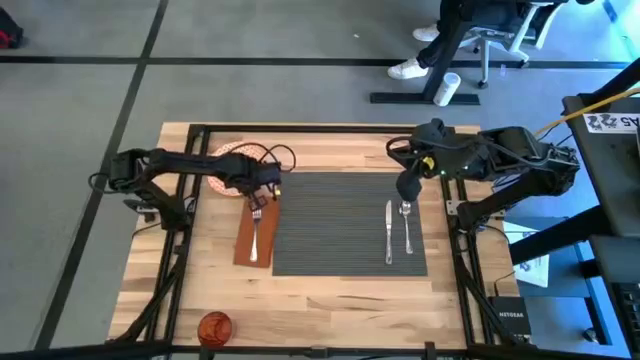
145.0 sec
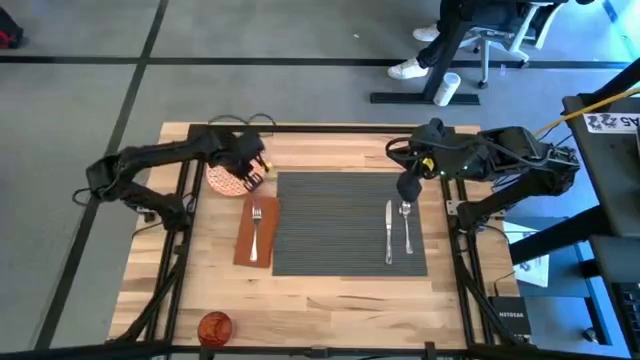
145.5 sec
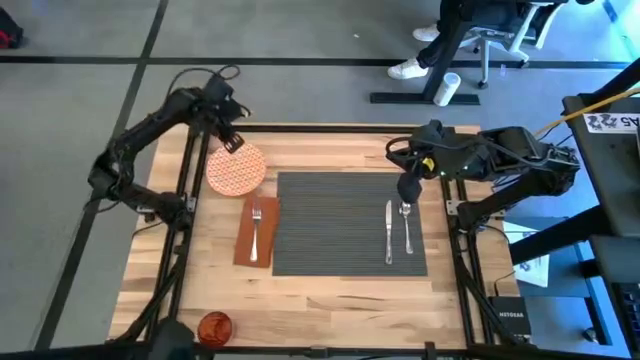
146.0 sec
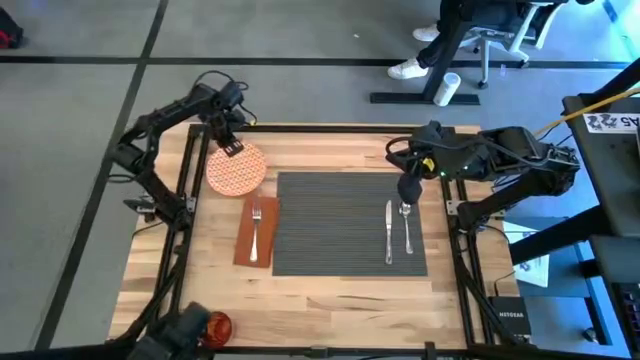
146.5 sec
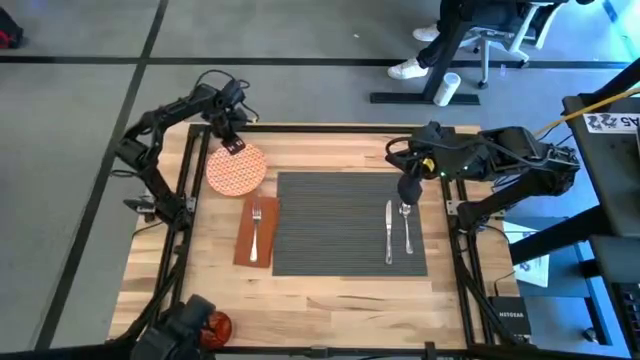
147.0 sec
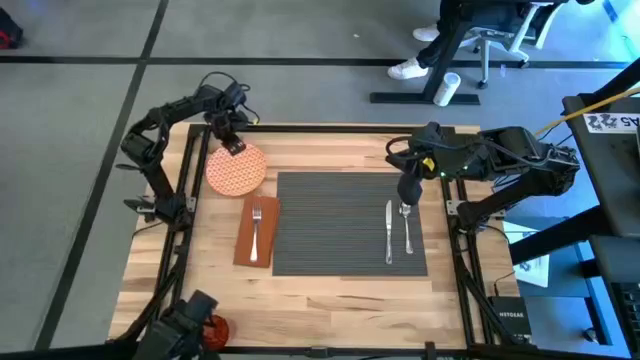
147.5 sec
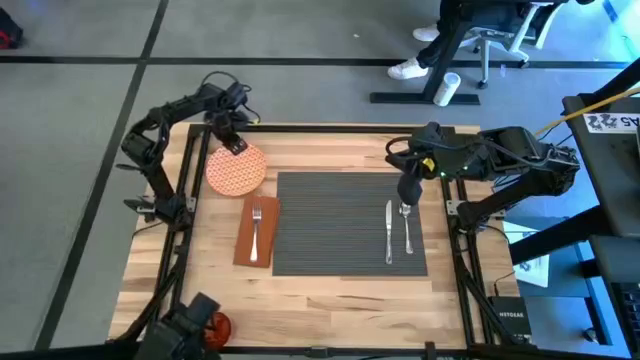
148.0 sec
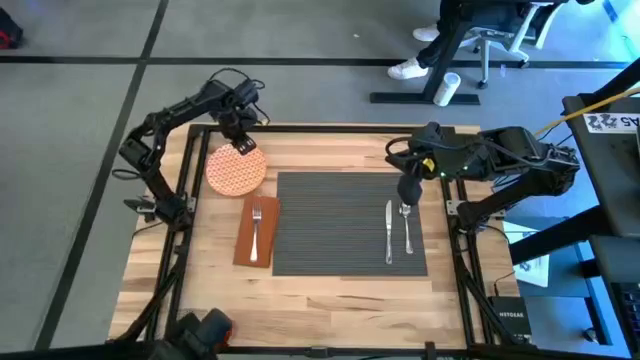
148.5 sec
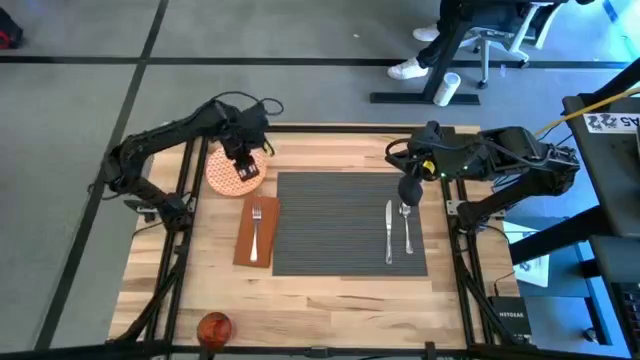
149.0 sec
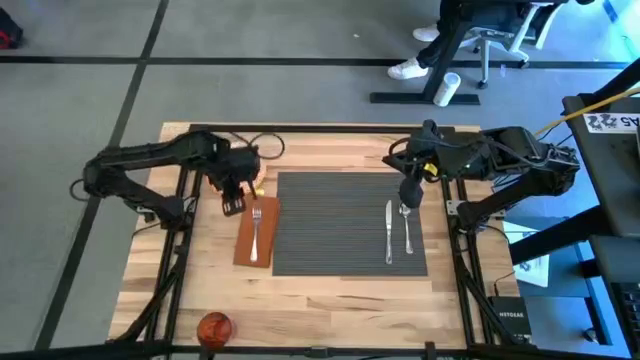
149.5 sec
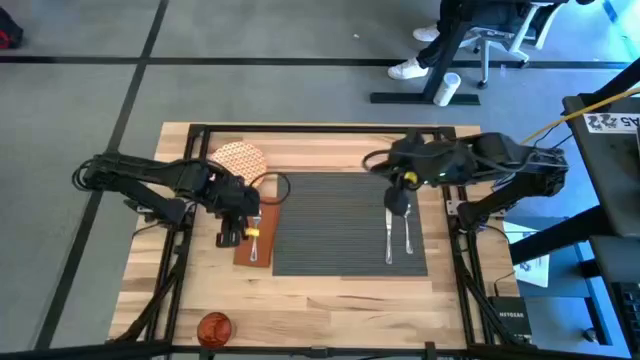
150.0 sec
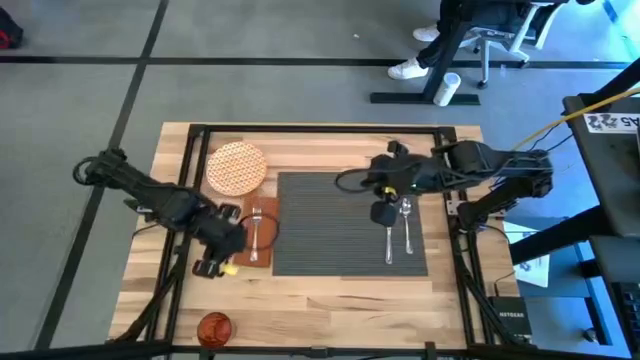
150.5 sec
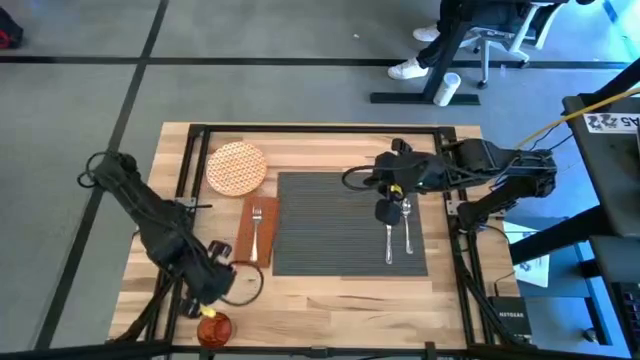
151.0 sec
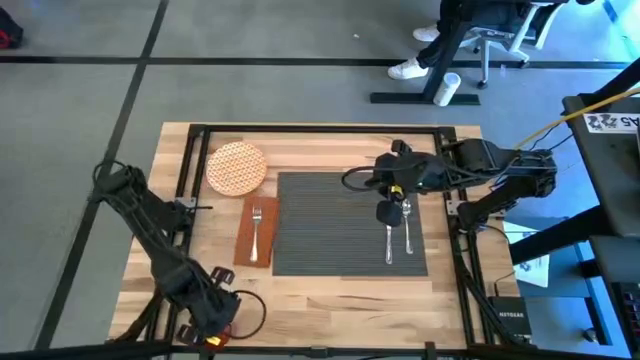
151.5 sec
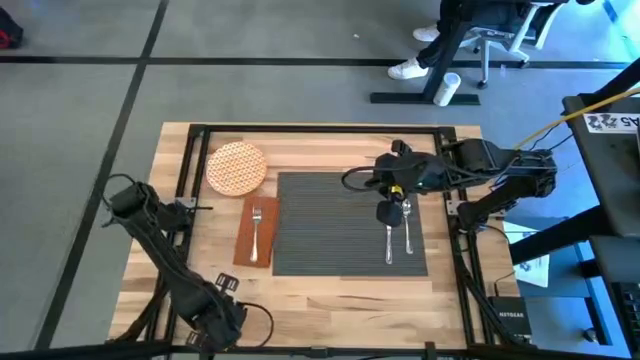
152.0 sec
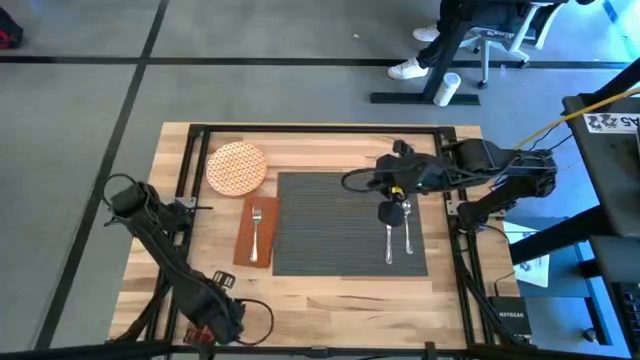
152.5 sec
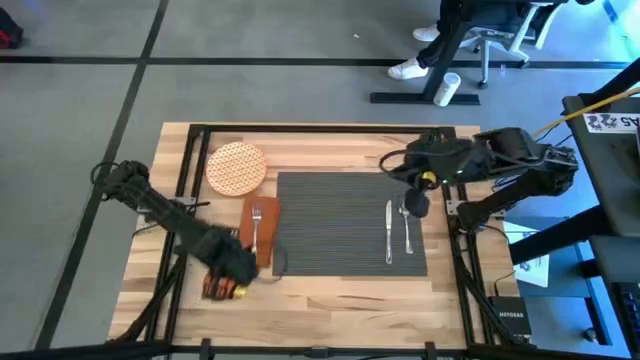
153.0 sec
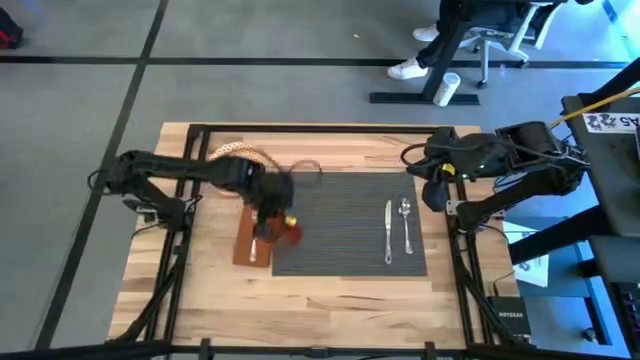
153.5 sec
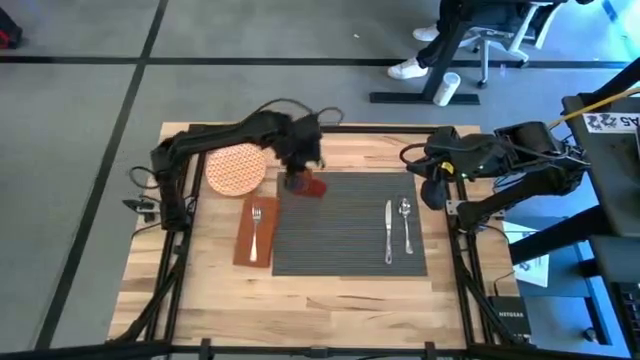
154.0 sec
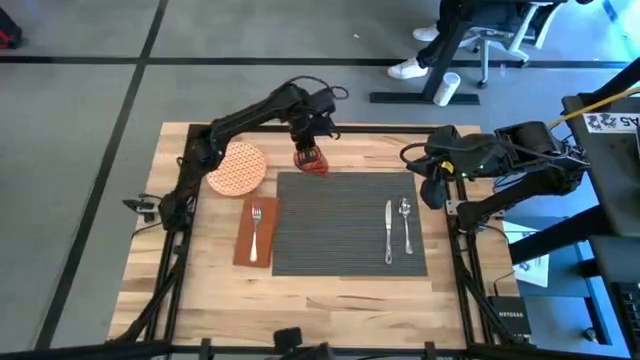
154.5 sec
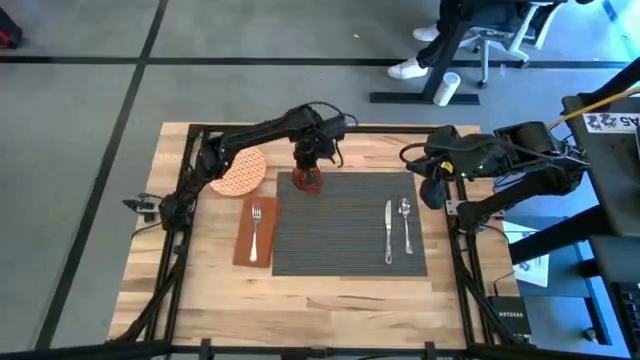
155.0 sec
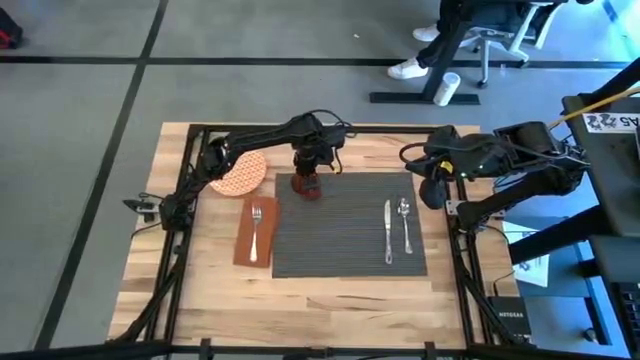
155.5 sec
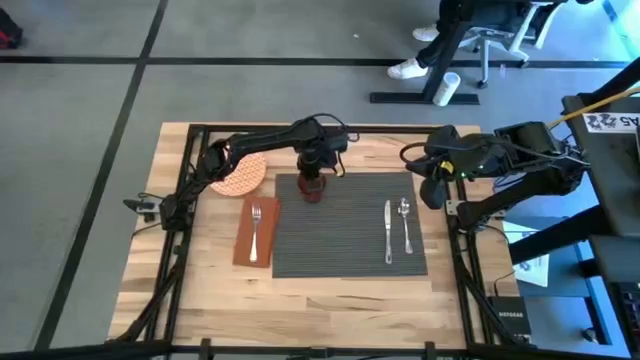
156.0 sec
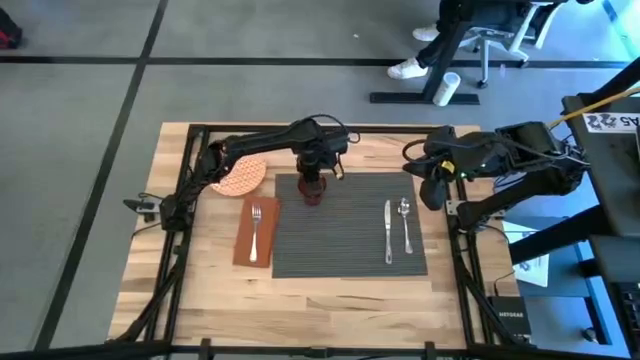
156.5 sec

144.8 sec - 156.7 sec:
Task: Set table place
Put the orange glass on the top left of the gray tablemat

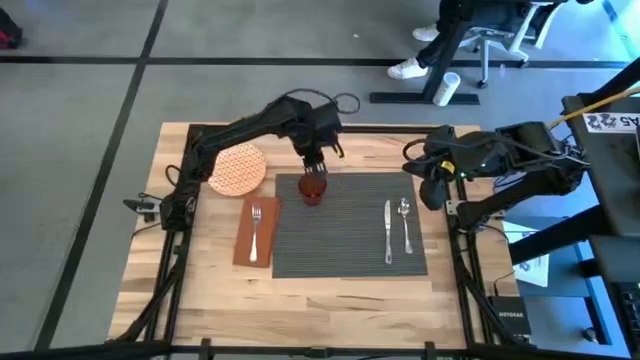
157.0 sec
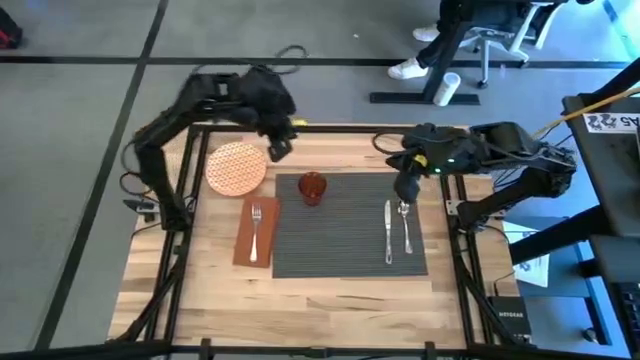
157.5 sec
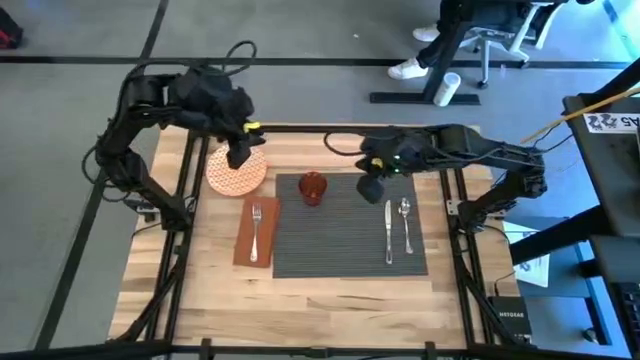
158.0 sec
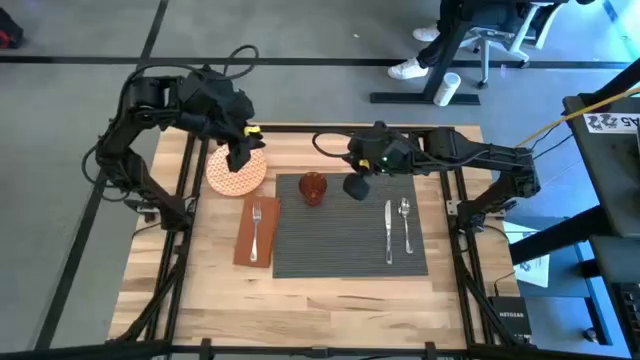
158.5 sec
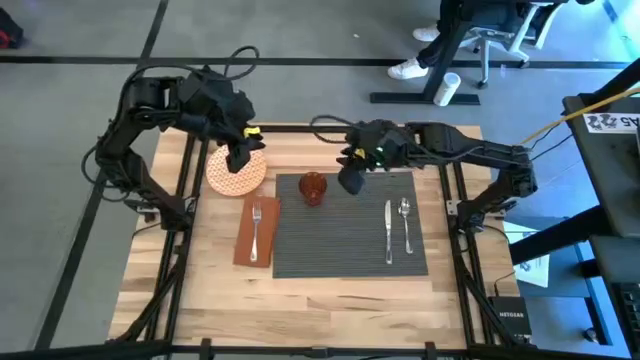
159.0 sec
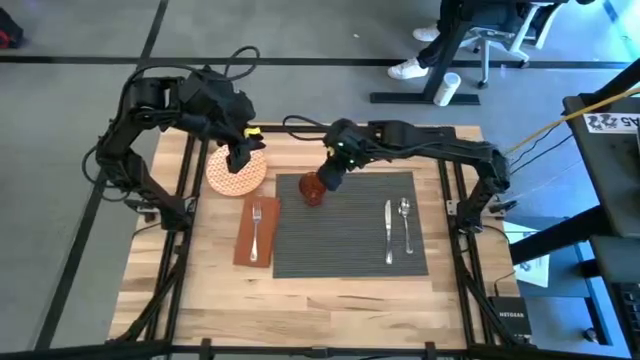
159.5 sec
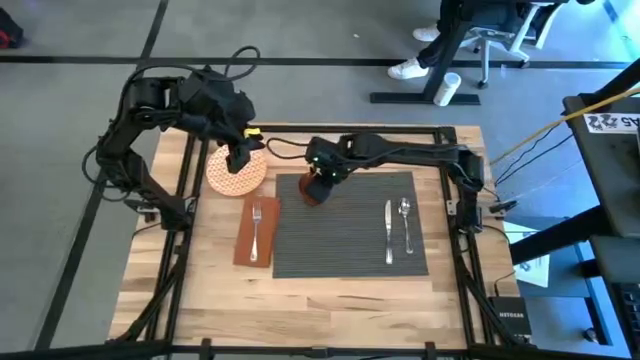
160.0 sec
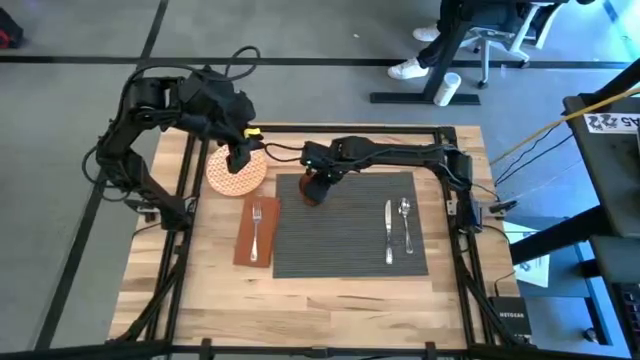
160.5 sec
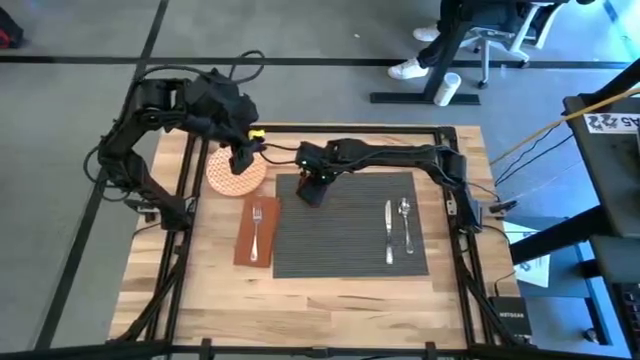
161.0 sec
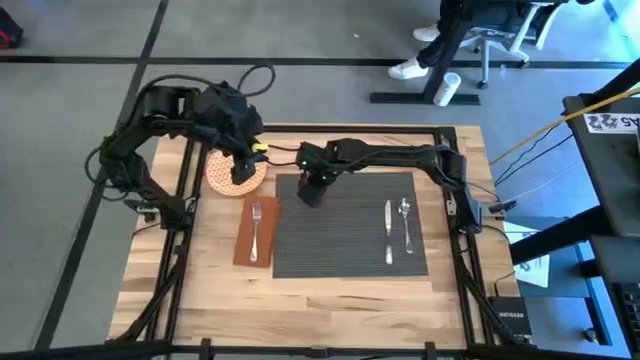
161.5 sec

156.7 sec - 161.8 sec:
Move the orange glass to the top right of the table

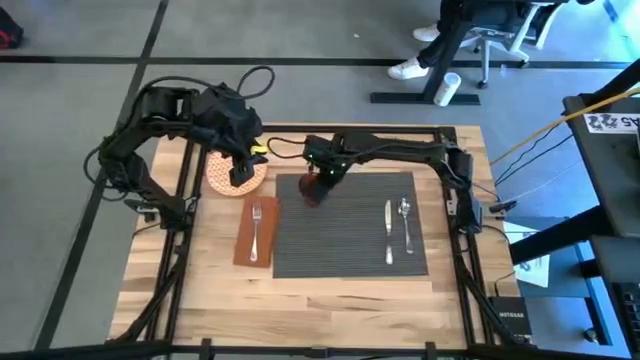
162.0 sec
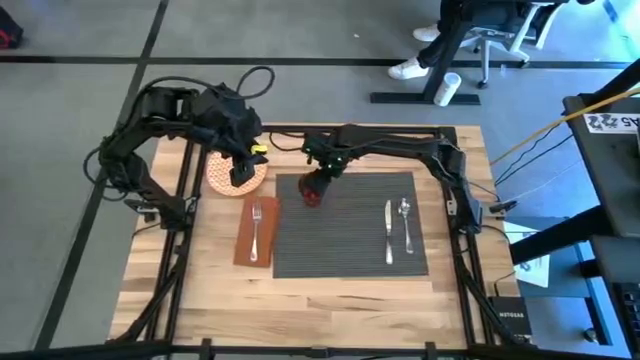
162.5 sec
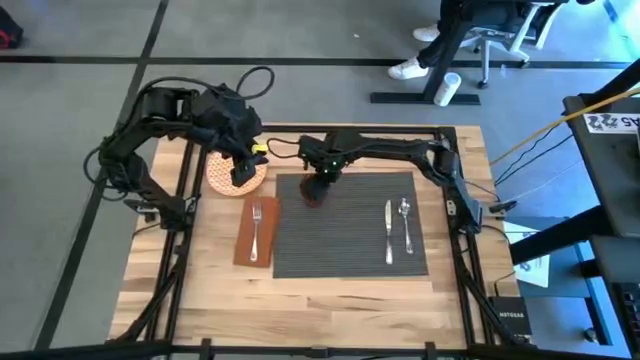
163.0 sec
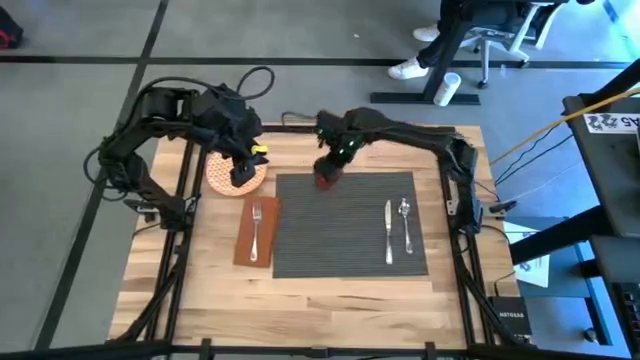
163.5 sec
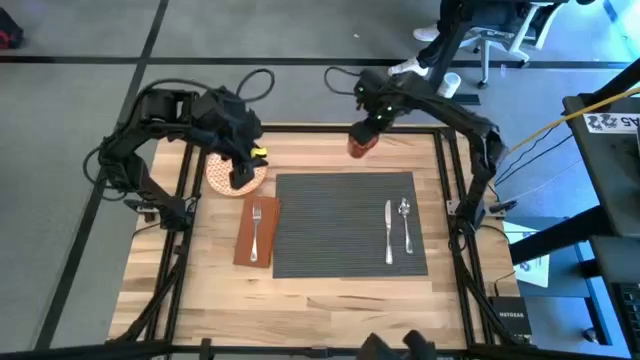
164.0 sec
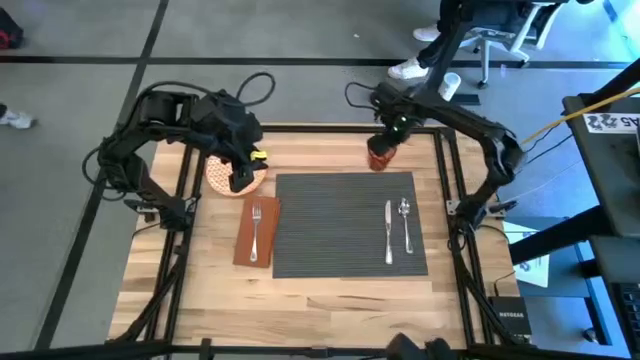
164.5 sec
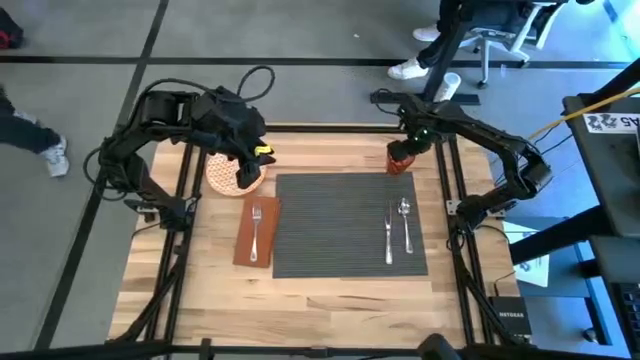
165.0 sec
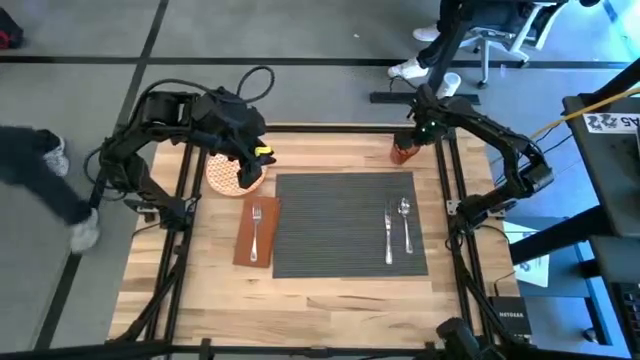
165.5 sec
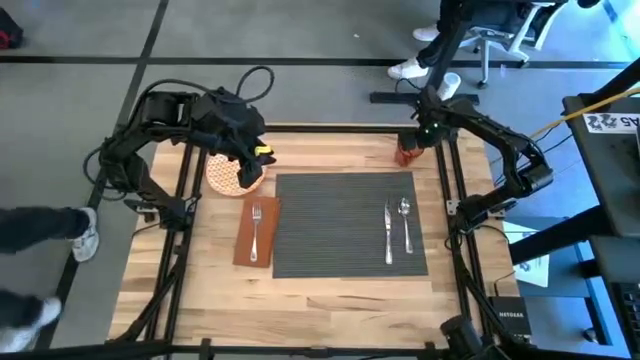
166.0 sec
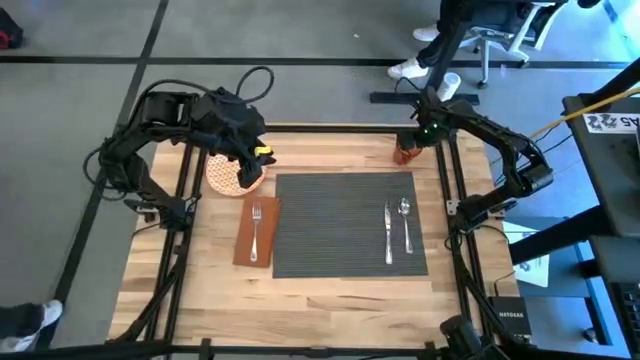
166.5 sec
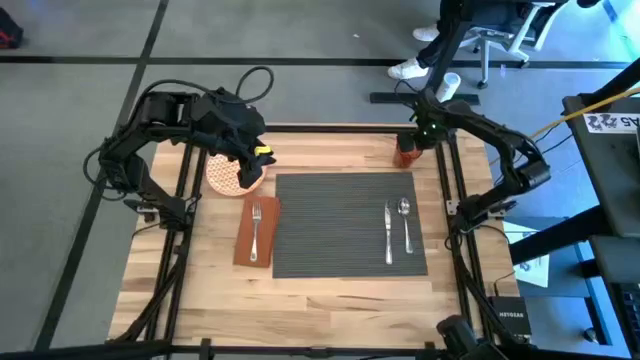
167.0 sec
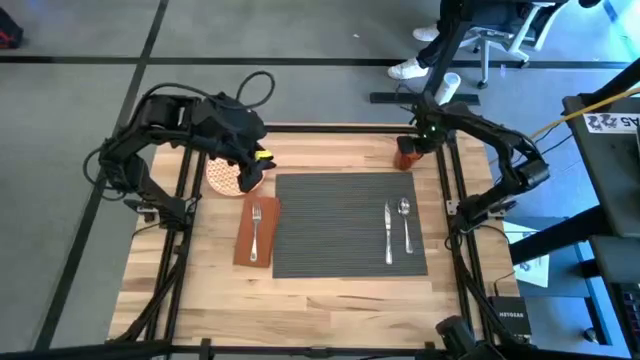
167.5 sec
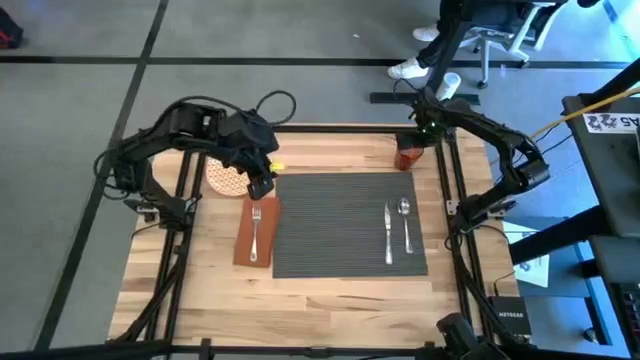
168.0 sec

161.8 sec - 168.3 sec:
Move the orange glass to the top right of the table
